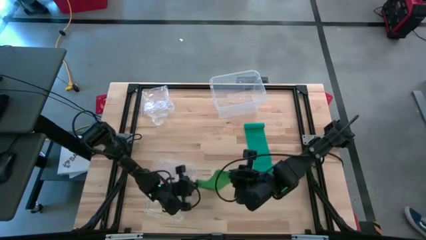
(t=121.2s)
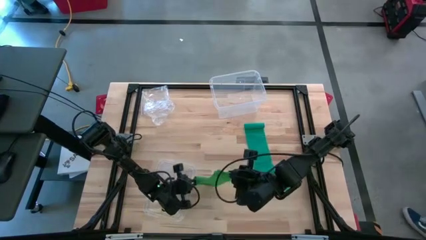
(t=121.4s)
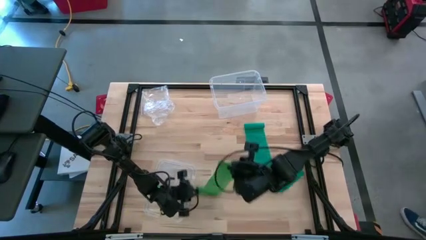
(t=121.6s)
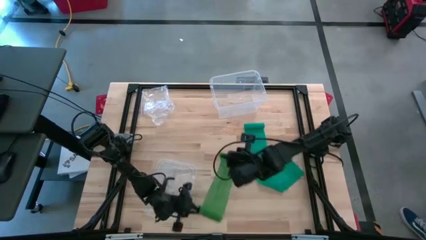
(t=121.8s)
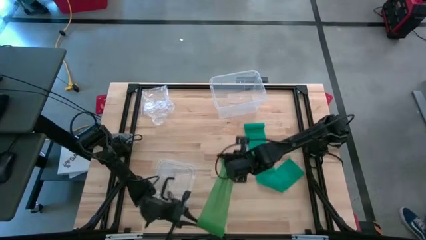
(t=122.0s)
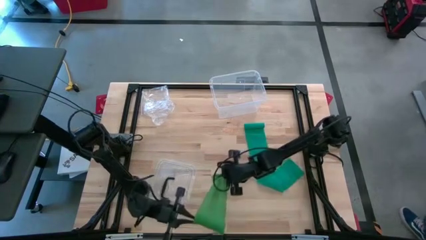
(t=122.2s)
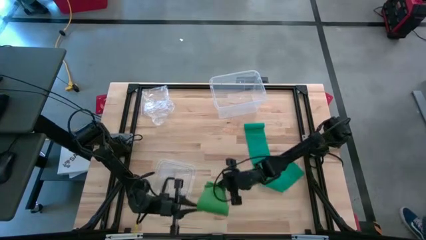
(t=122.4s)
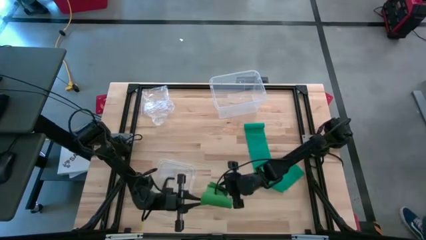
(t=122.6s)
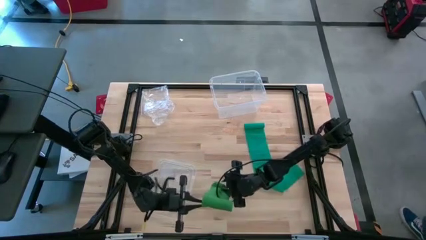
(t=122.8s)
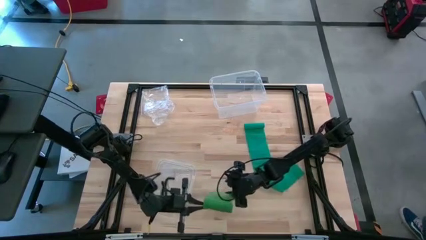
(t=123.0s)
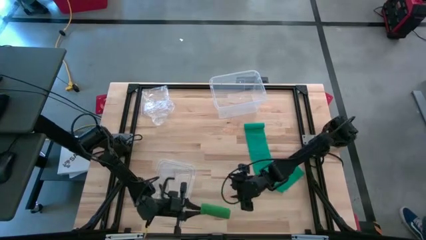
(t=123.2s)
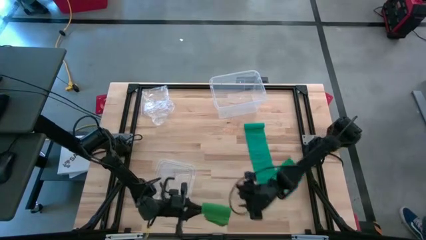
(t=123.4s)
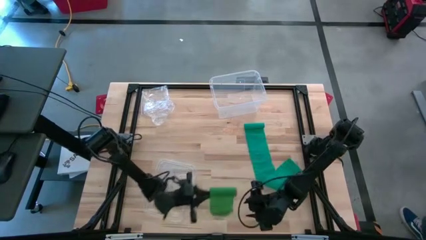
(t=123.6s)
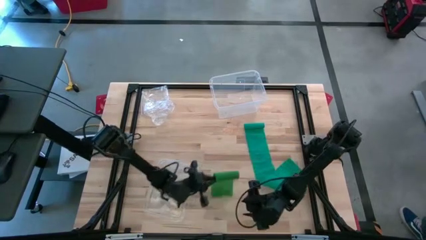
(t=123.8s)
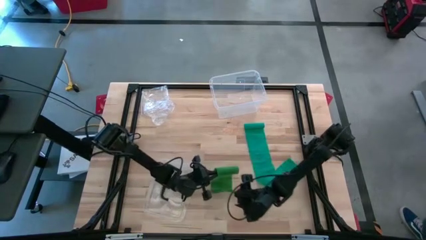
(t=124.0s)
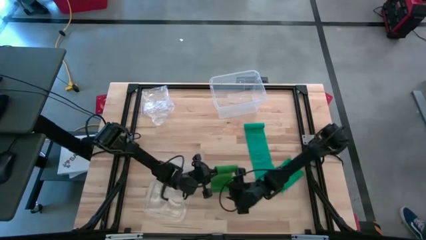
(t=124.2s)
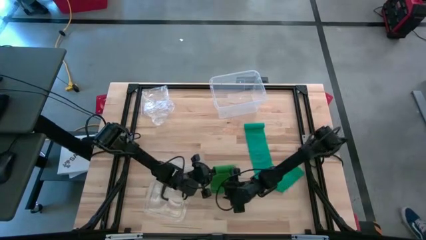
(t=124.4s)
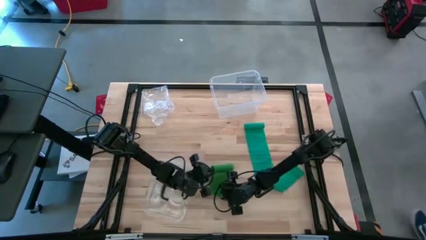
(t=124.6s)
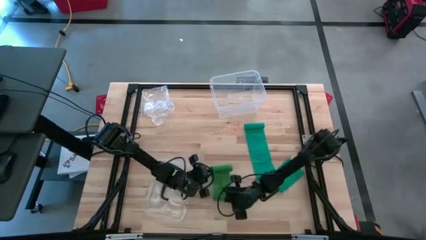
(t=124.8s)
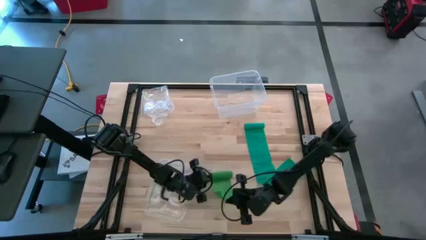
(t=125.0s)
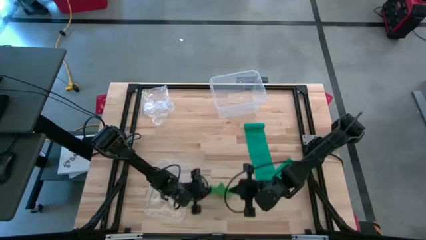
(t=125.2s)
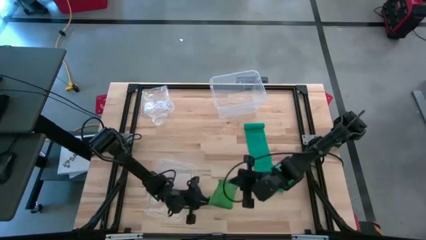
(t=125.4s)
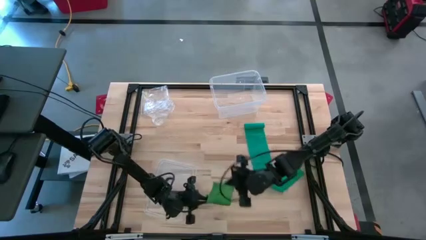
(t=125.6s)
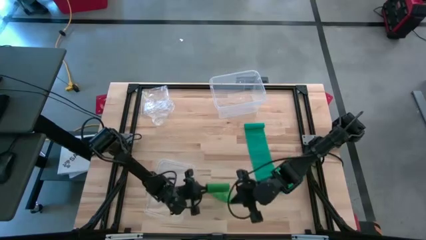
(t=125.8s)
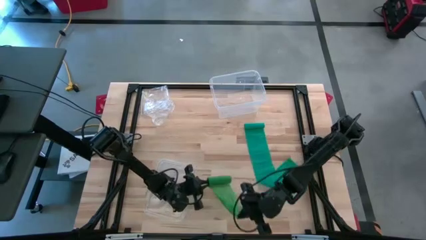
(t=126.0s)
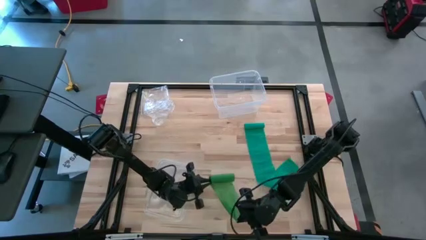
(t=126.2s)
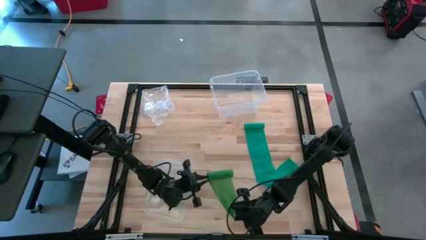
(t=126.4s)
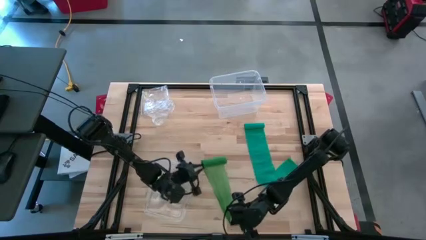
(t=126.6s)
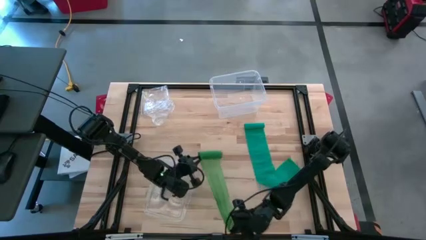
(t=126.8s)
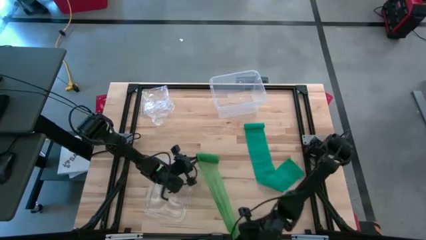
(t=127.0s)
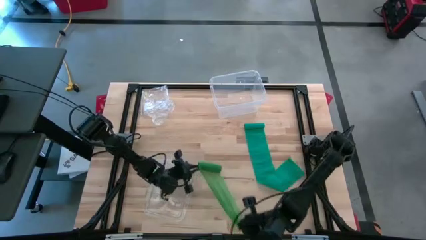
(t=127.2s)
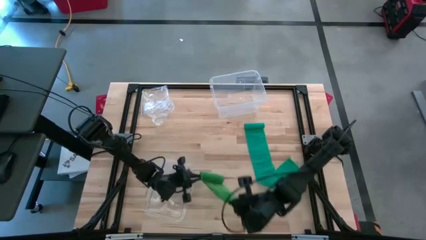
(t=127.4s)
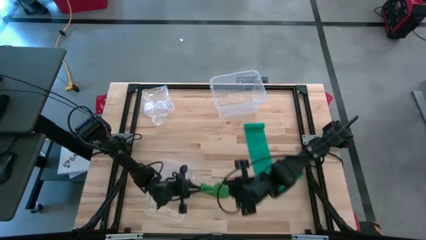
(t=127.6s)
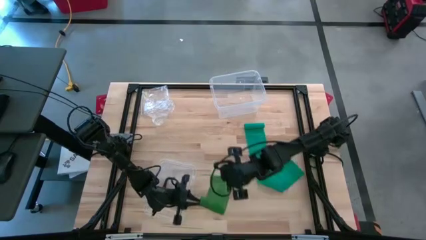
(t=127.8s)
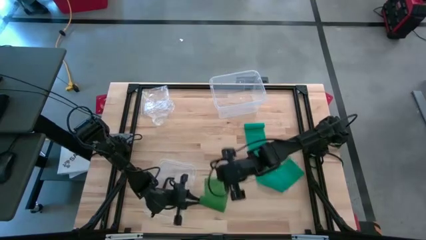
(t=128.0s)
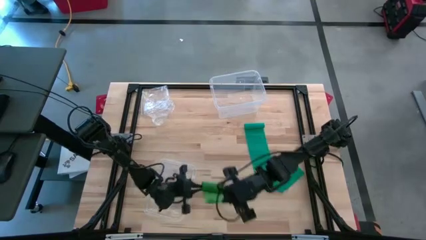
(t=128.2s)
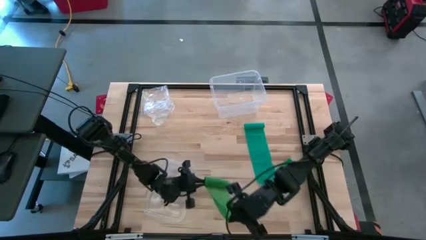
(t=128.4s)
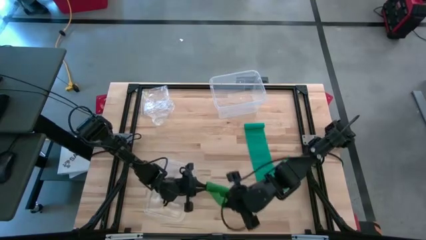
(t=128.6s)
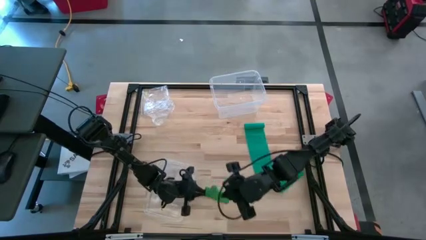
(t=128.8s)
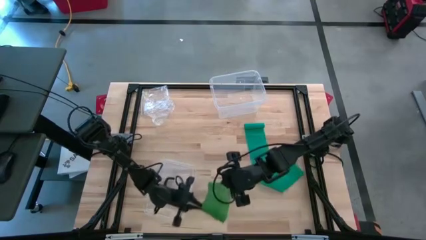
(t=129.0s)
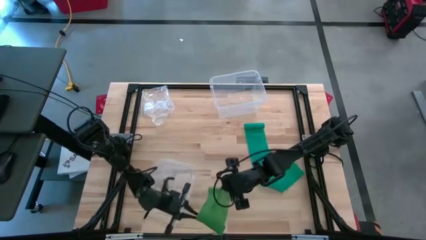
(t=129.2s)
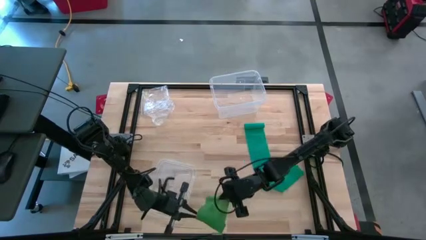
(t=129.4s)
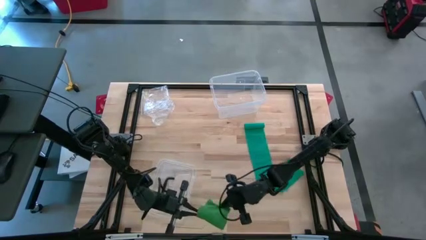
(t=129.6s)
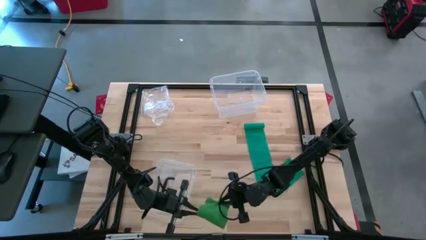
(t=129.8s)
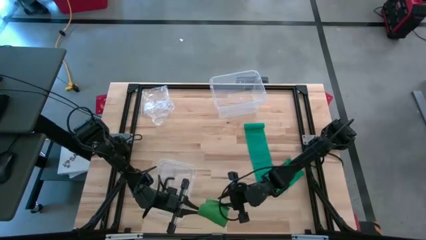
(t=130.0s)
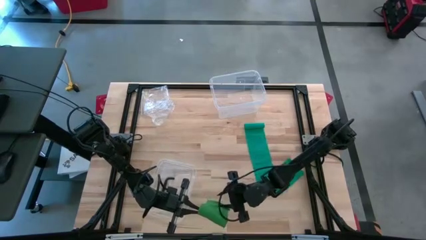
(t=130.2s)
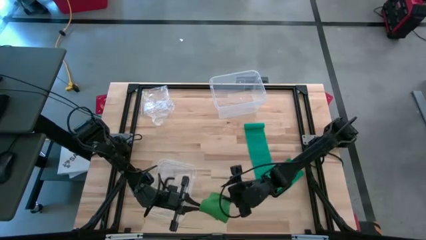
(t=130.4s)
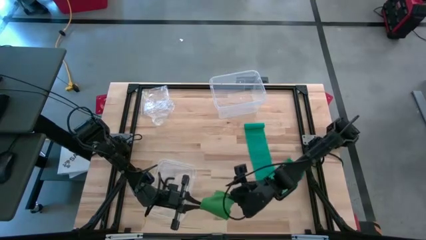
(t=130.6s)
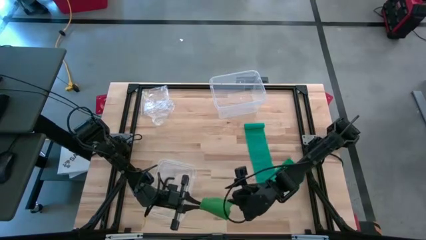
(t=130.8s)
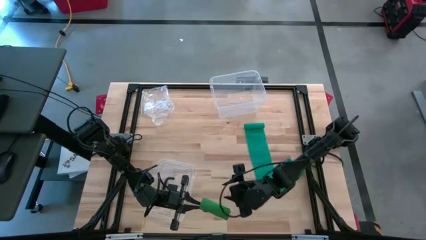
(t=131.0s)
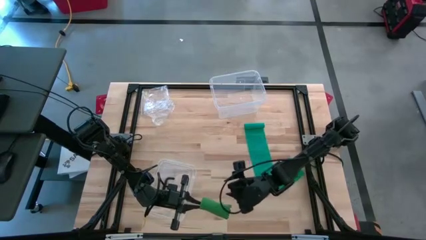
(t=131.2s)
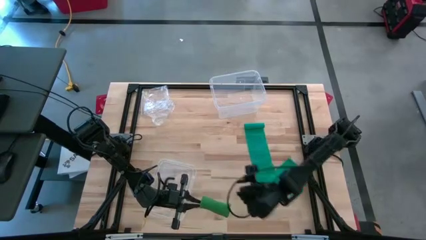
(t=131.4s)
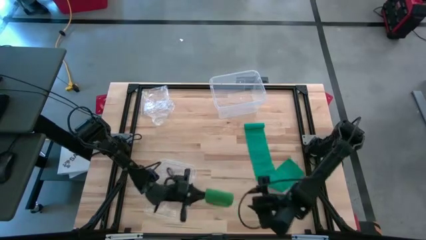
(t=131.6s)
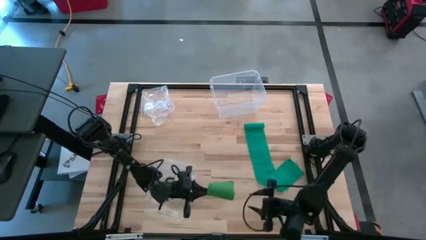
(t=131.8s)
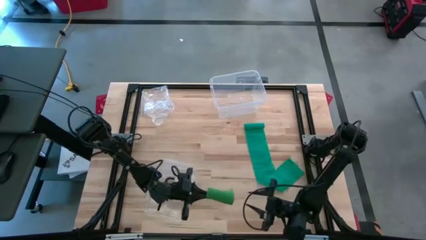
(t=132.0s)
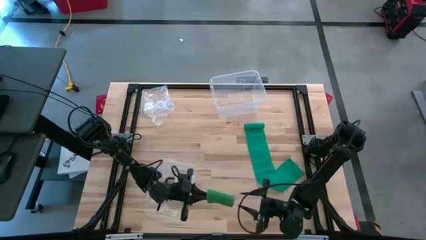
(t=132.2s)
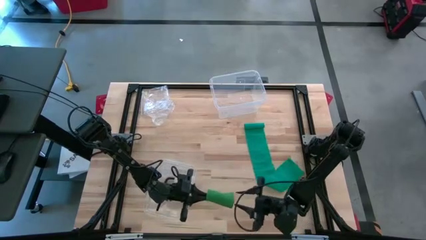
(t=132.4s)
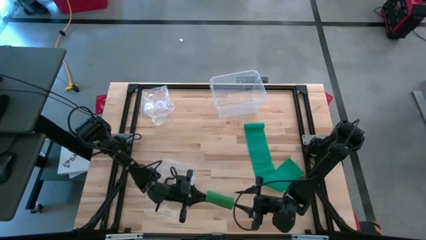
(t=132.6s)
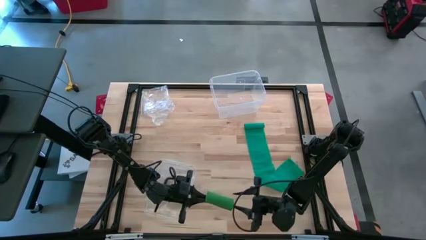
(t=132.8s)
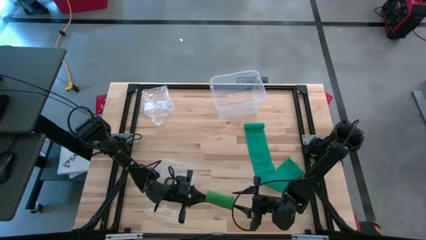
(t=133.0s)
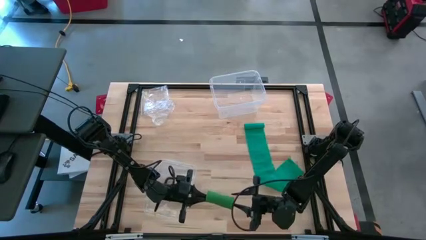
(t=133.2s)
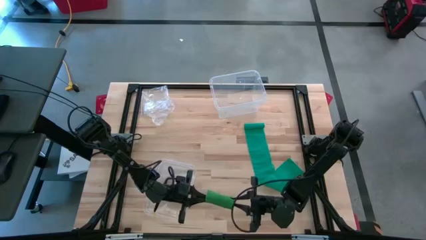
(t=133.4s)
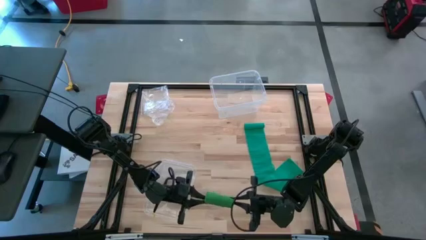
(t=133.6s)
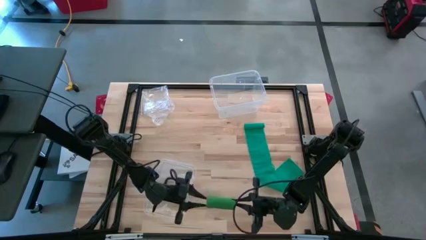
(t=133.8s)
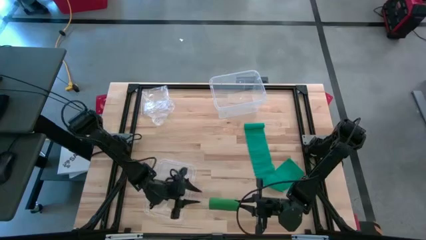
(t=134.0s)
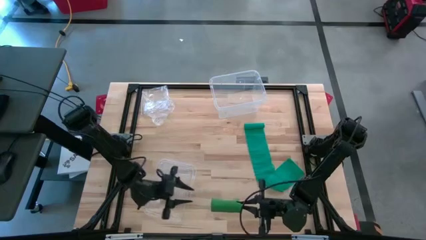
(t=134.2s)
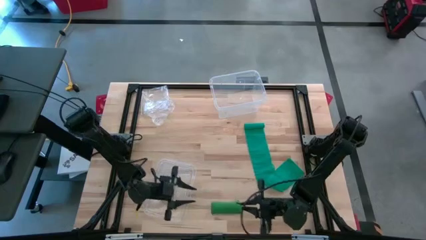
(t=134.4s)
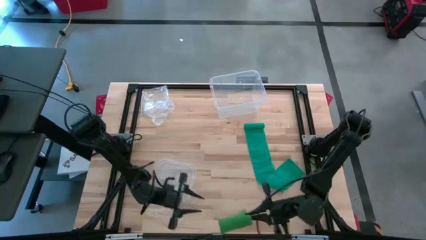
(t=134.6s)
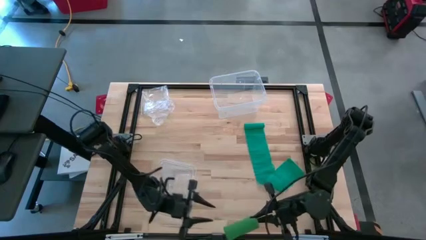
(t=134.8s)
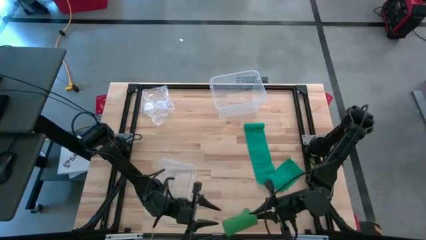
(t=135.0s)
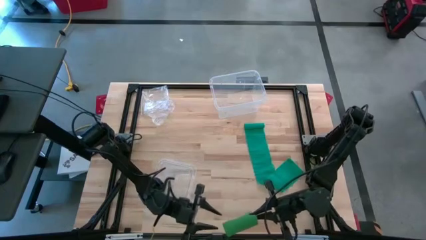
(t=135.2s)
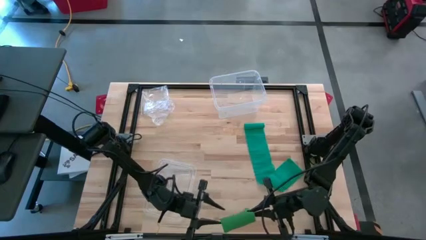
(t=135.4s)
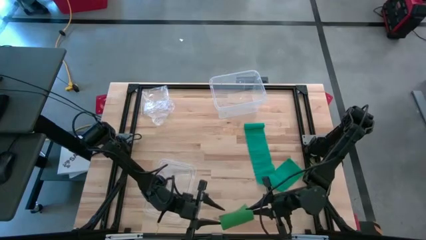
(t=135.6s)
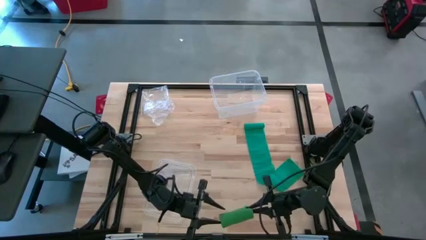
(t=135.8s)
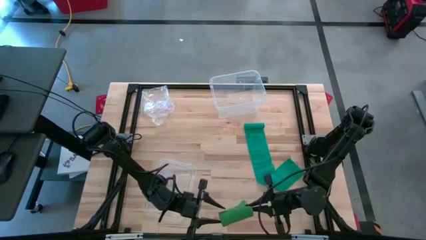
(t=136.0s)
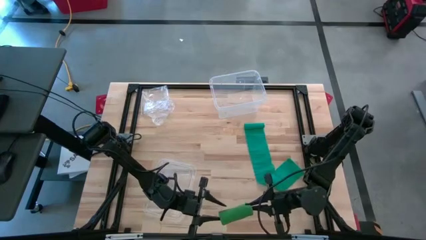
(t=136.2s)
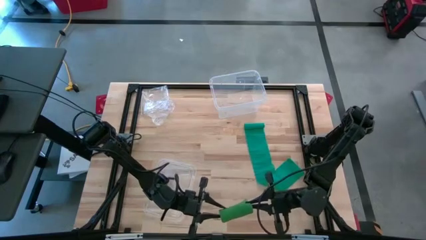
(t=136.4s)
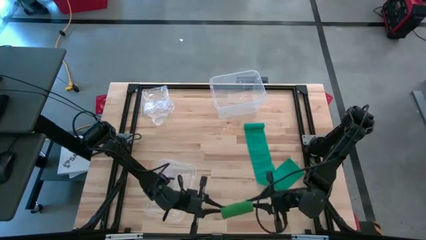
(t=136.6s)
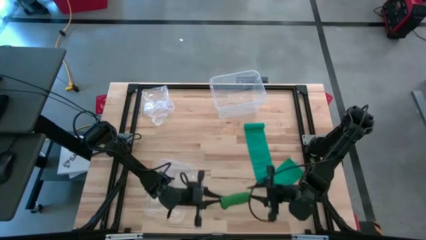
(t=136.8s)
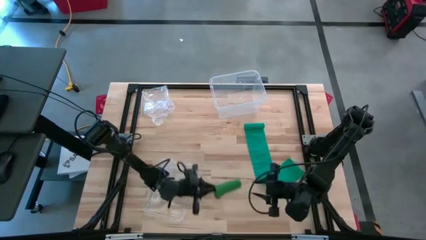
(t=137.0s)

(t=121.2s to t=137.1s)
Task: Roll bandage
Roll the green bandage
